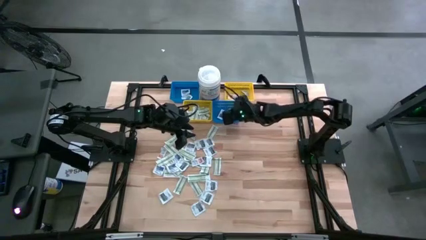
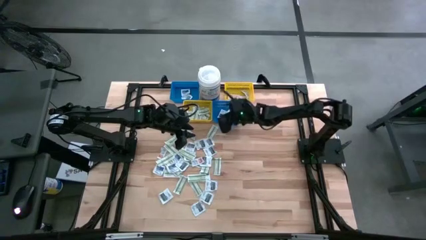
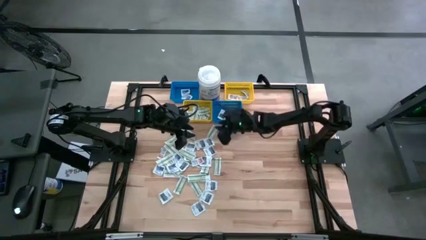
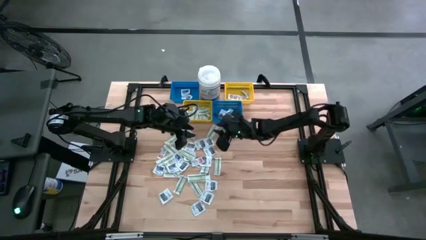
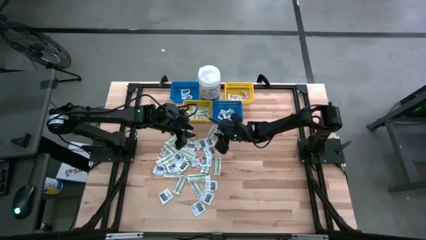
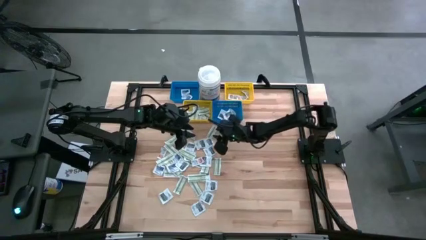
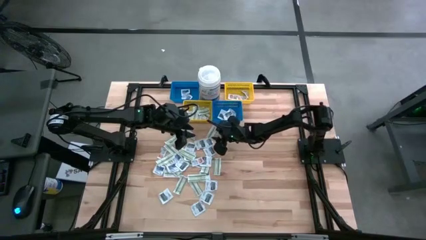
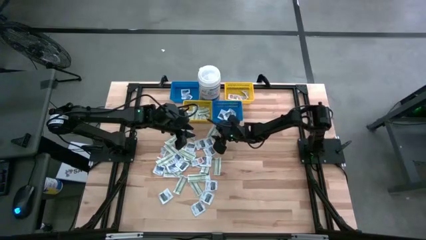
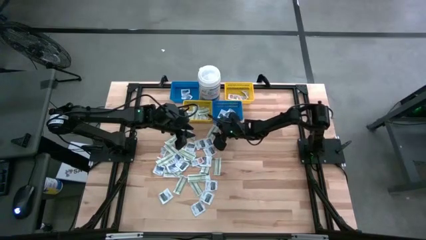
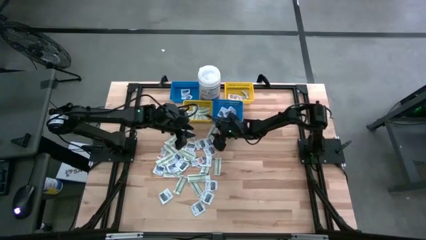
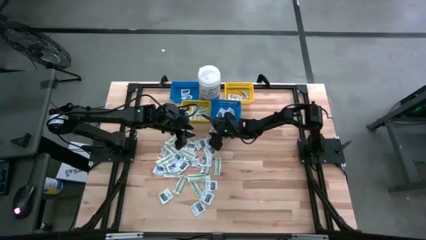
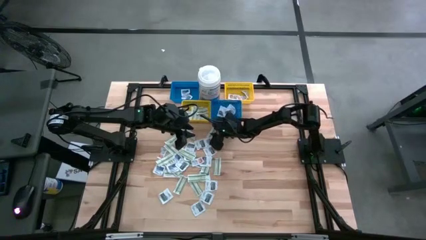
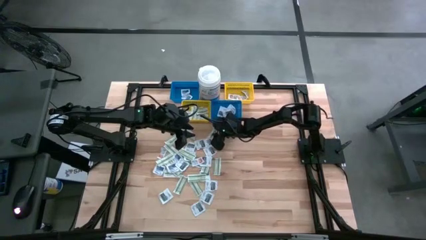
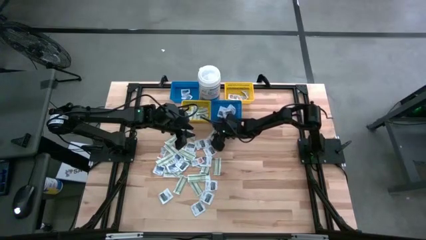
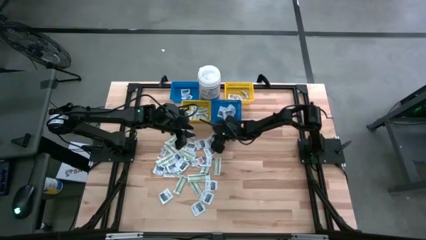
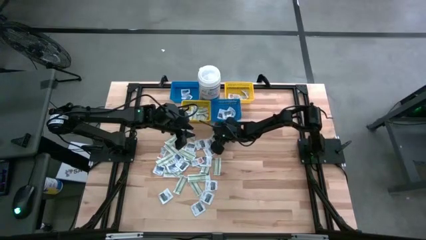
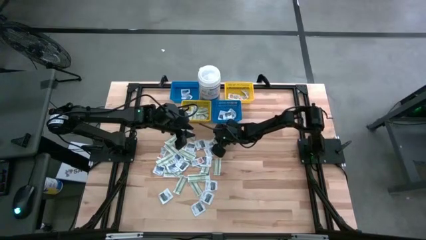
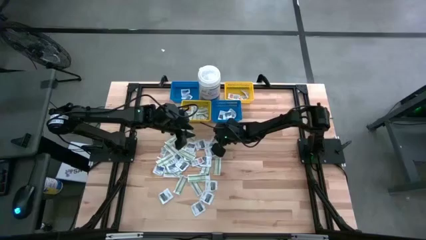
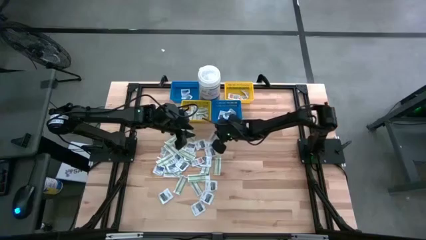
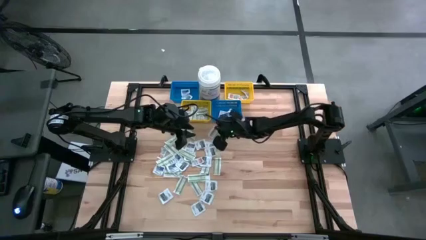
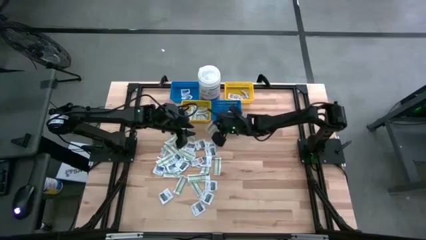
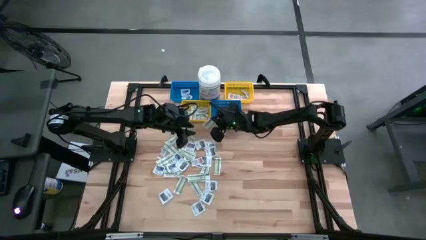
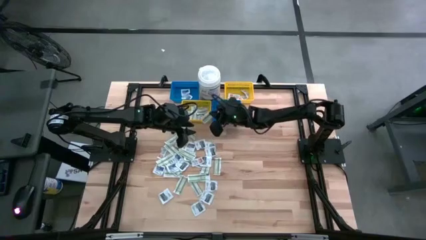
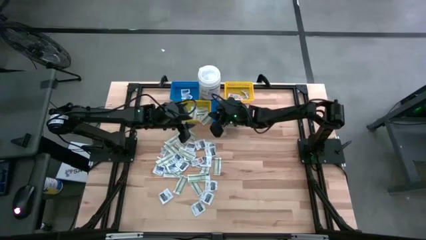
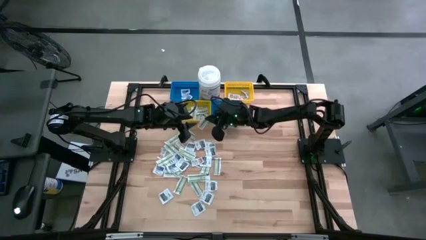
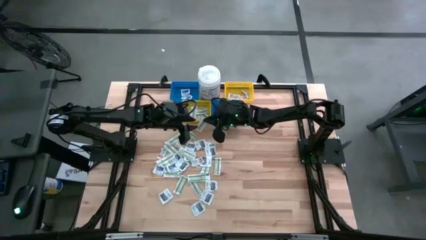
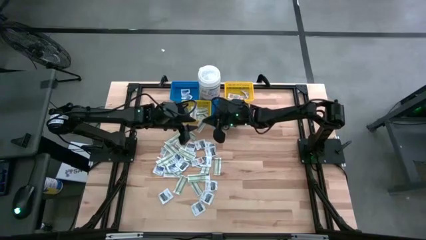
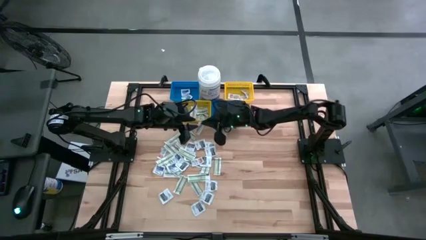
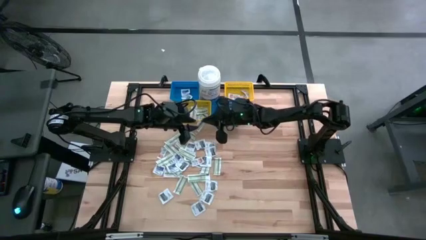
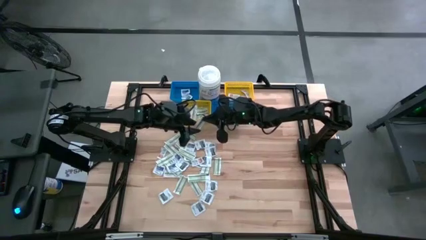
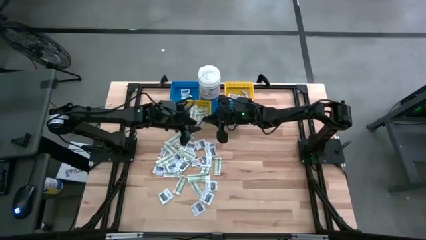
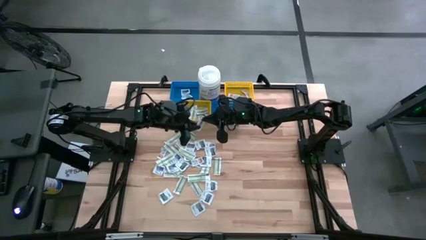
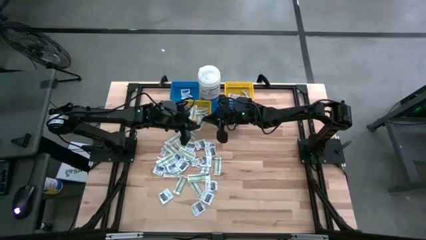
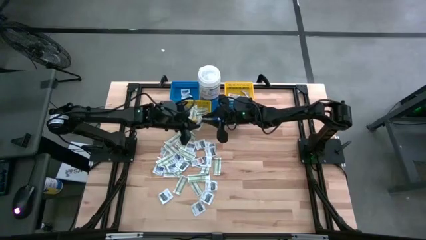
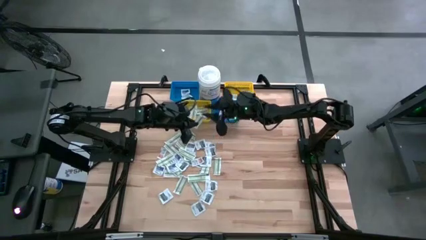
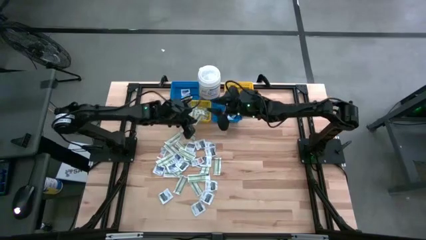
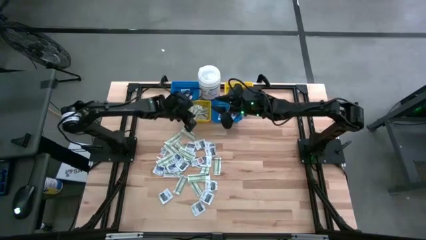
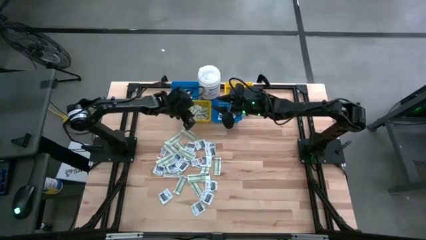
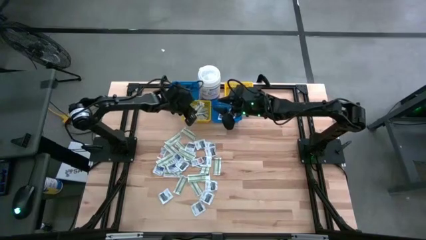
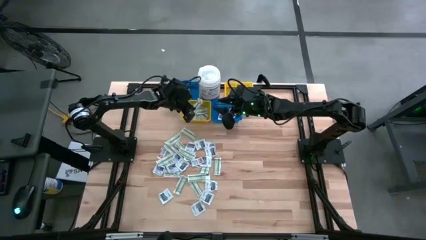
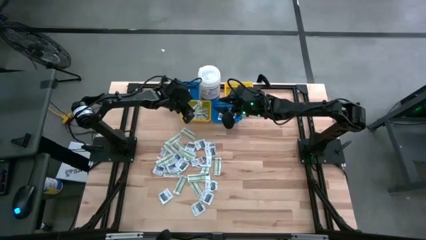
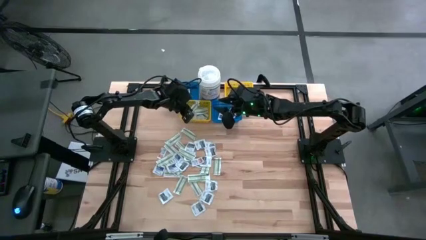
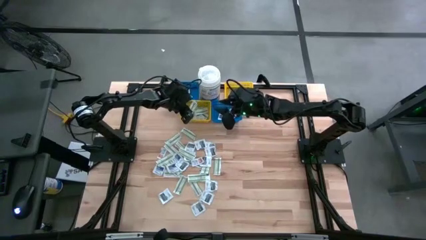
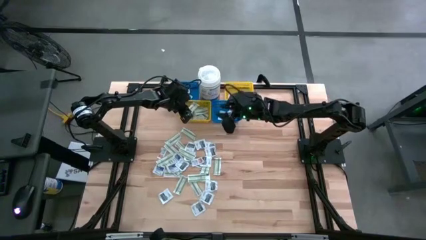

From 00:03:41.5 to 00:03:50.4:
Task: Pick & Place First Aid Supplies
Put the green bandage pad into the left yellow bin

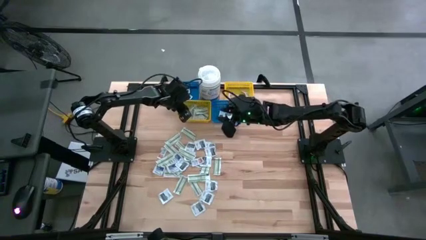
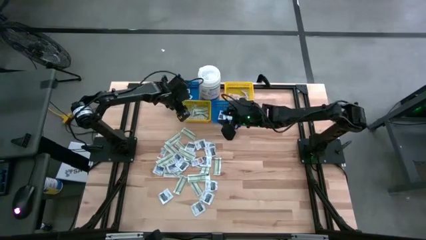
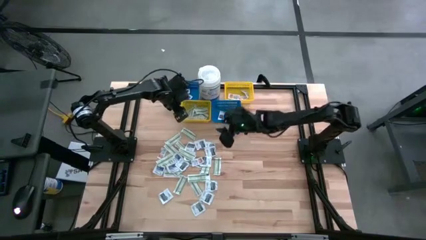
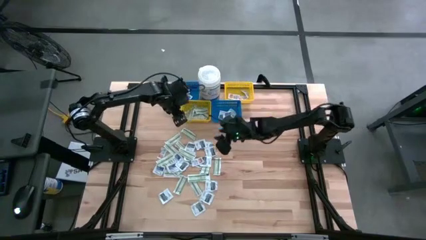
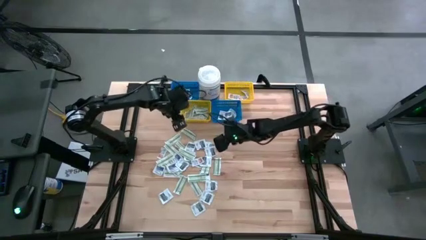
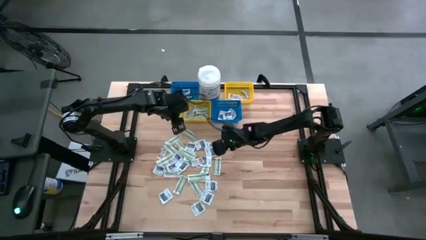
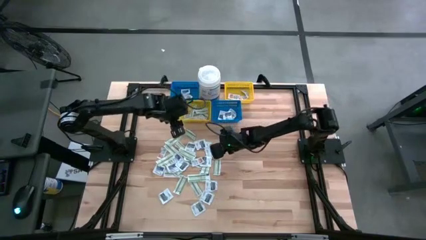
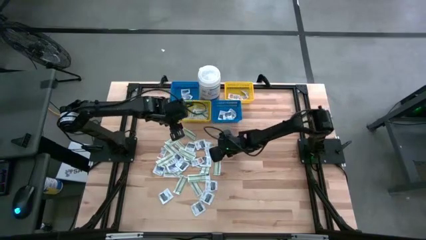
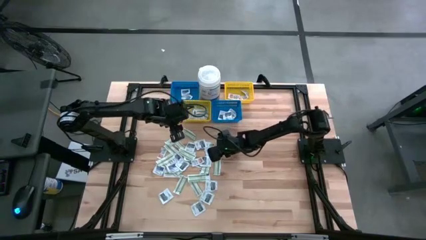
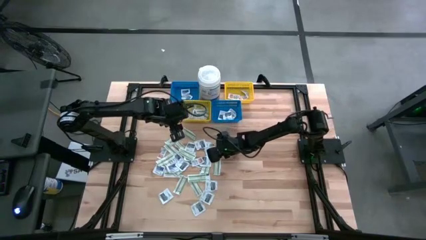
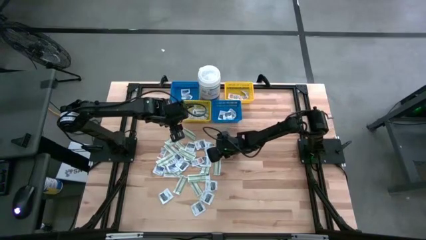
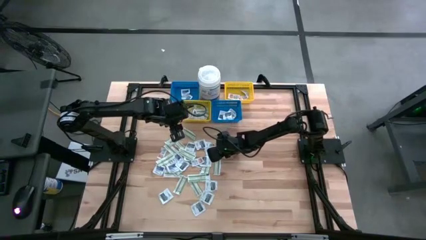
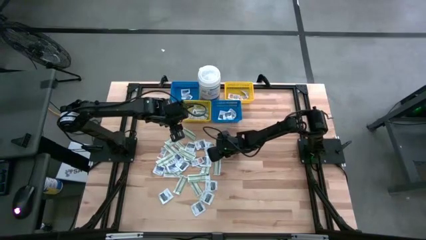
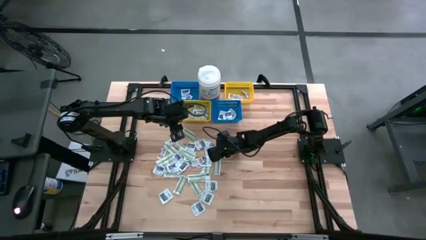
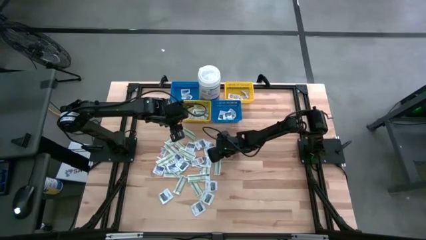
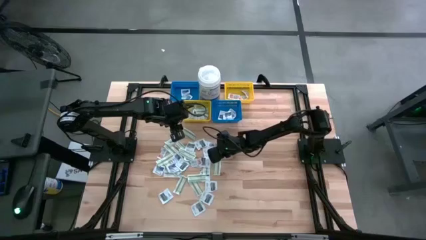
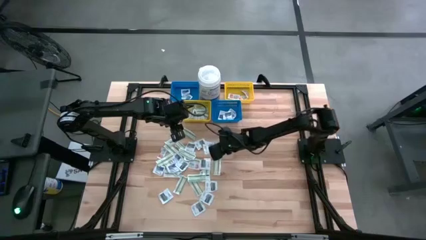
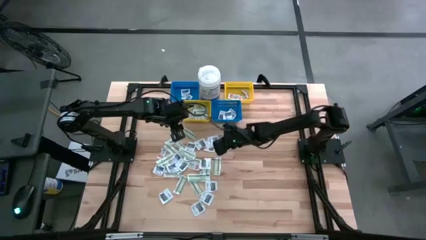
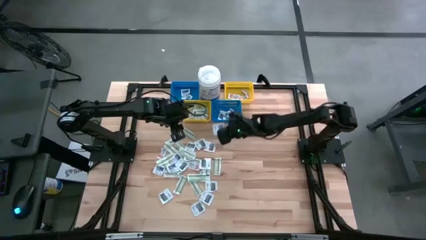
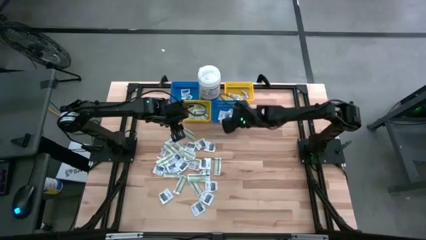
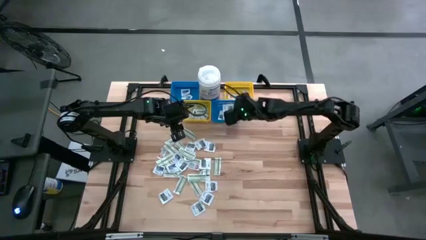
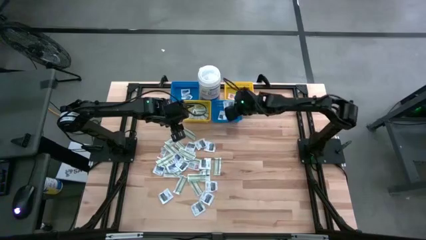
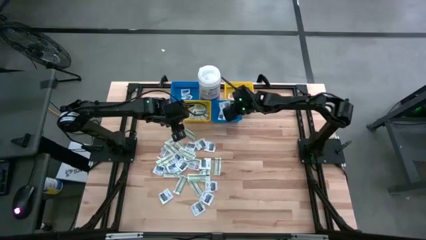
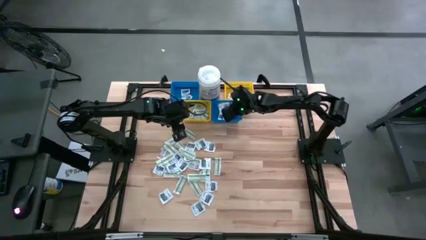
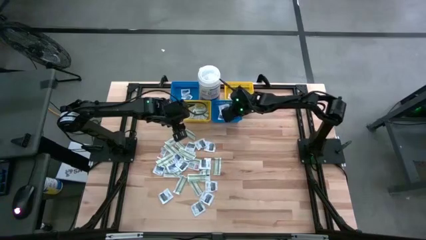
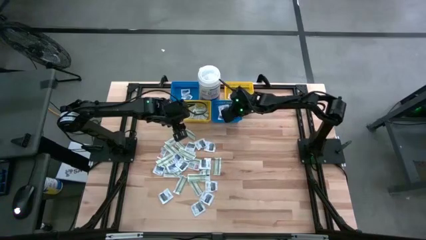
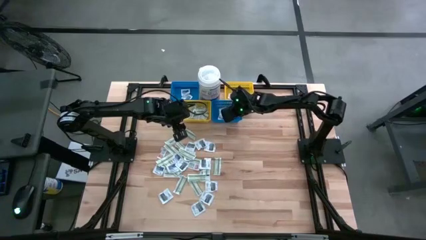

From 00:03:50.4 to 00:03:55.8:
Put the black towelette pack into the right blue bin

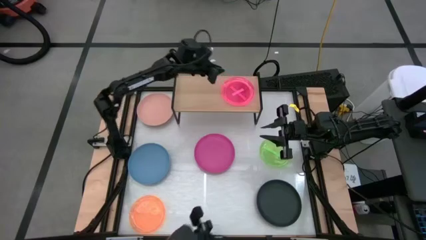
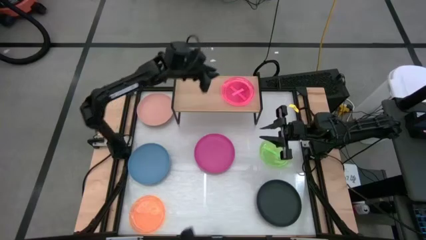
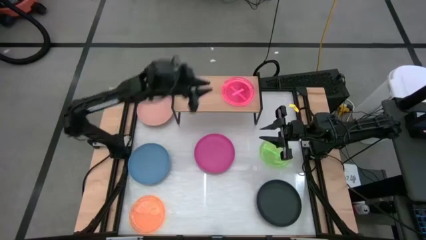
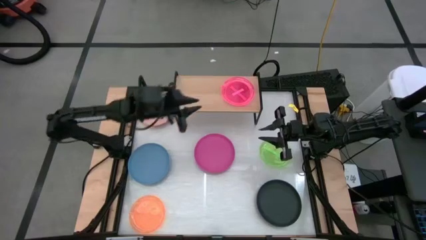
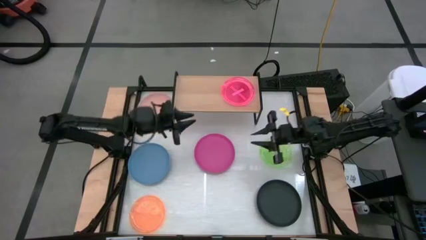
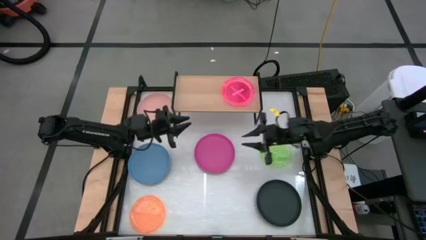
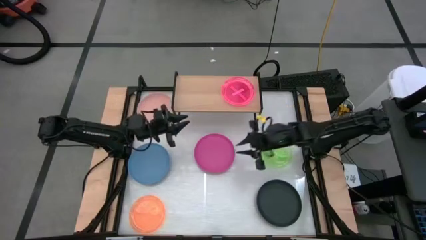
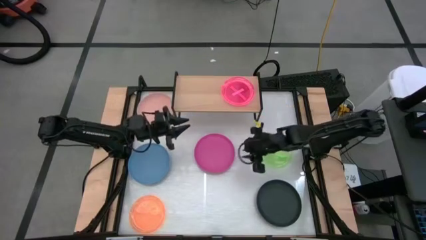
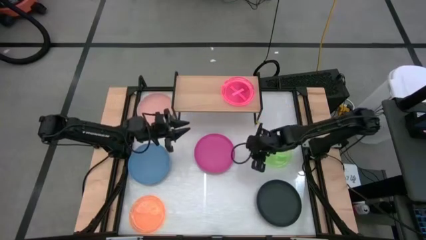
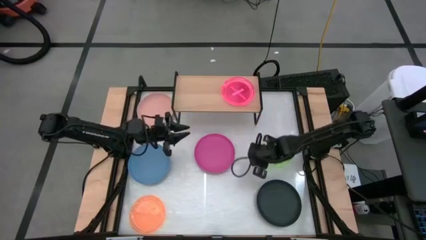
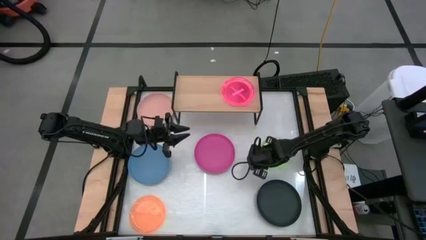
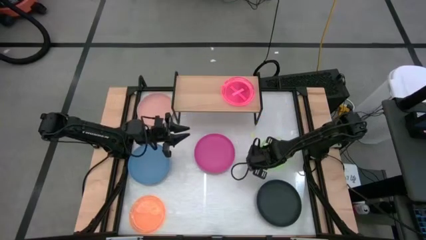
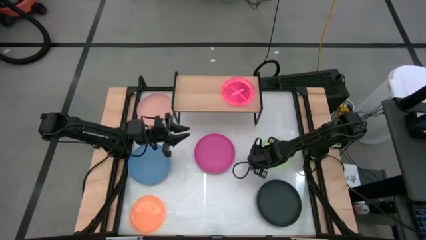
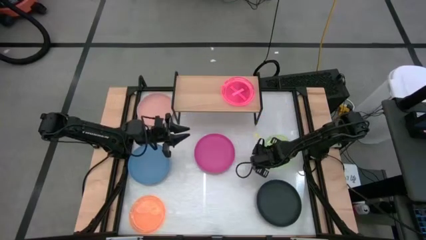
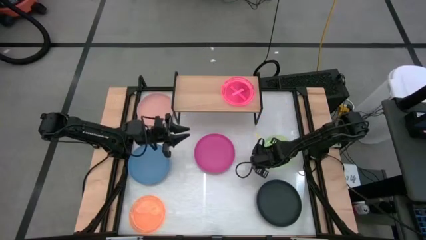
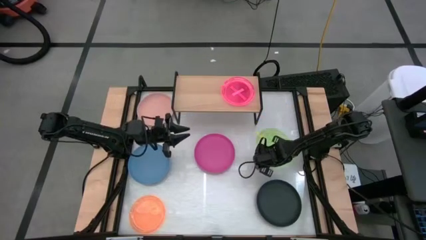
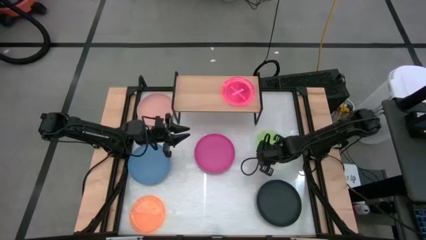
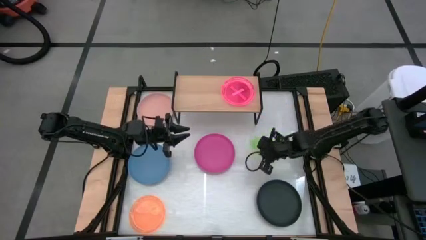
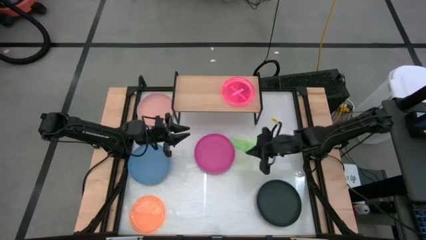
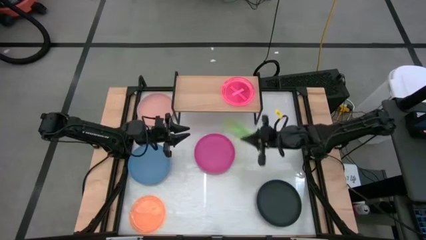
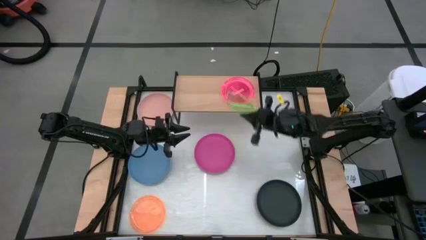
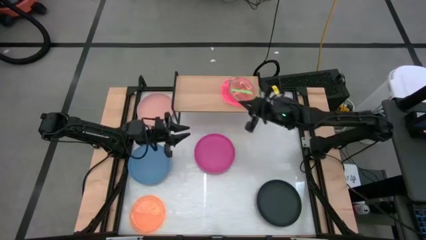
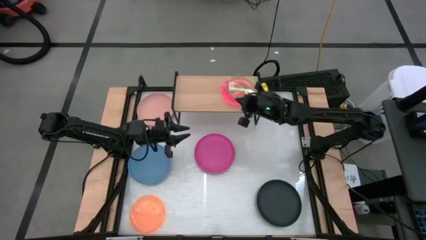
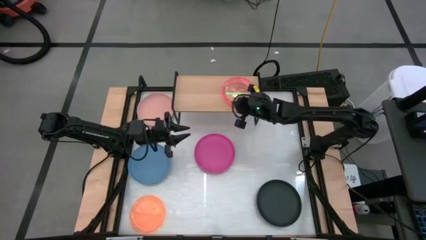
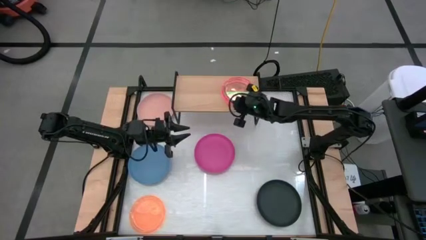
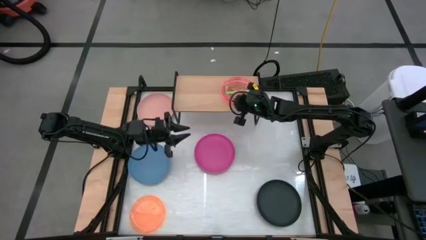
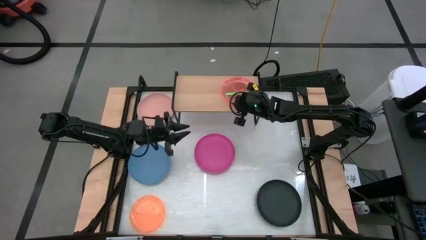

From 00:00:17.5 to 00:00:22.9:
Task: Place and stack plates onto a shelf
Stack the green plate on top of the pink plate on the shelf
